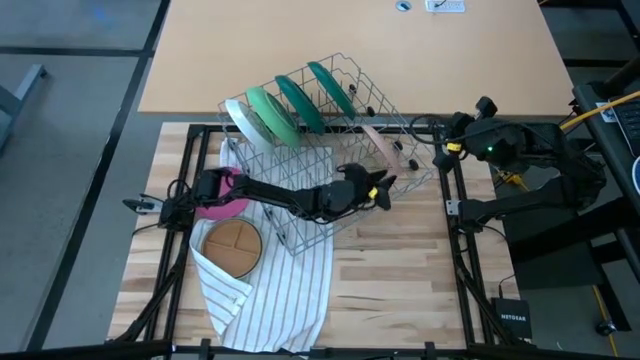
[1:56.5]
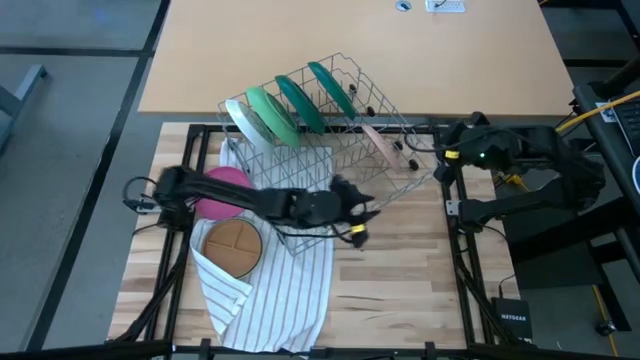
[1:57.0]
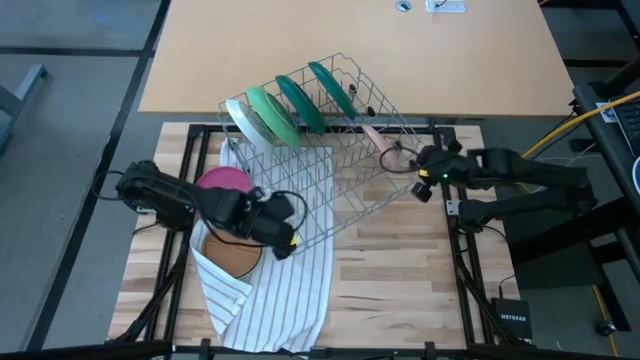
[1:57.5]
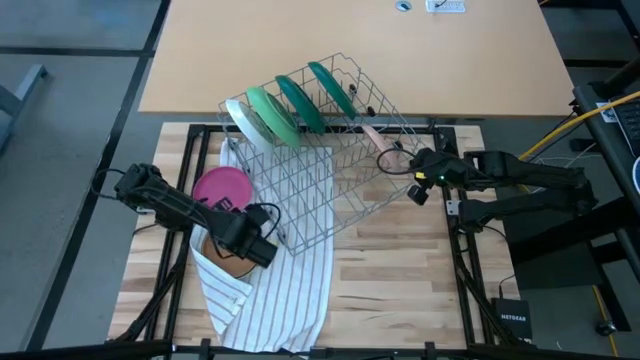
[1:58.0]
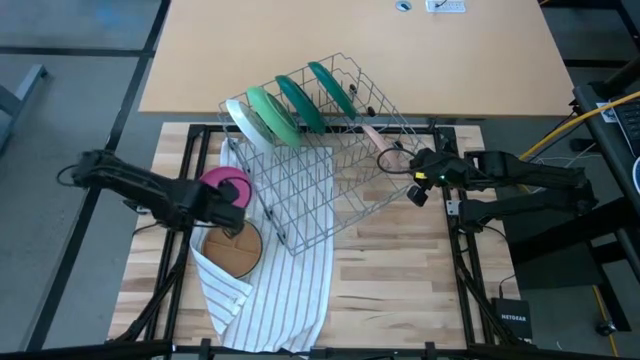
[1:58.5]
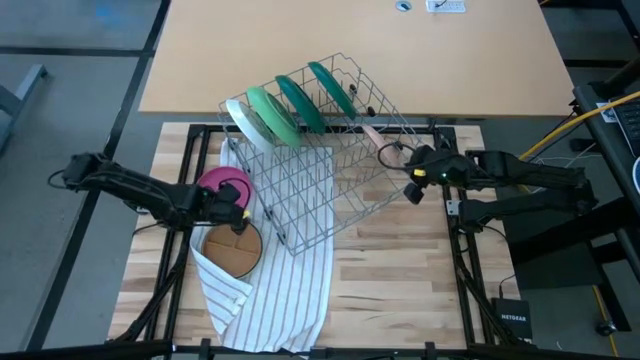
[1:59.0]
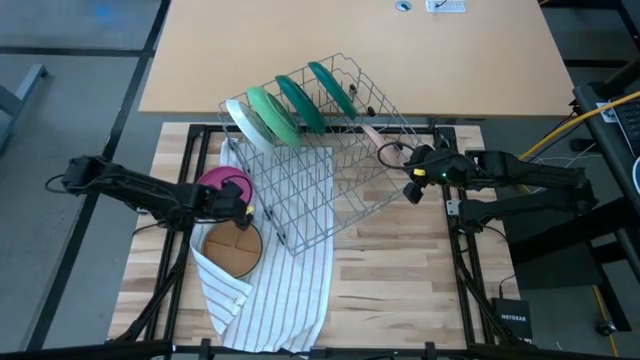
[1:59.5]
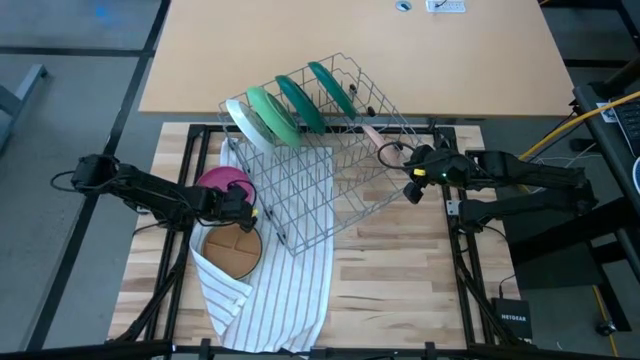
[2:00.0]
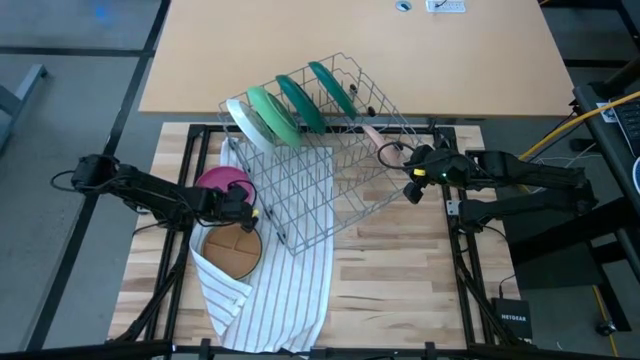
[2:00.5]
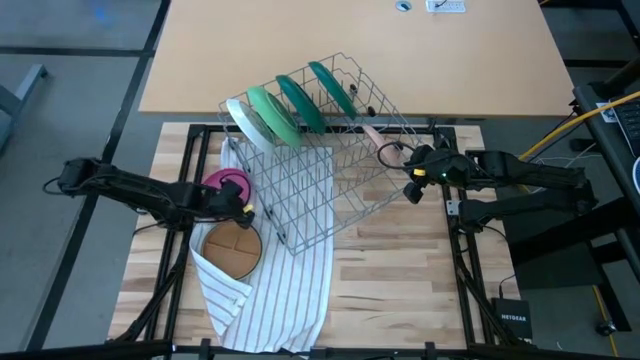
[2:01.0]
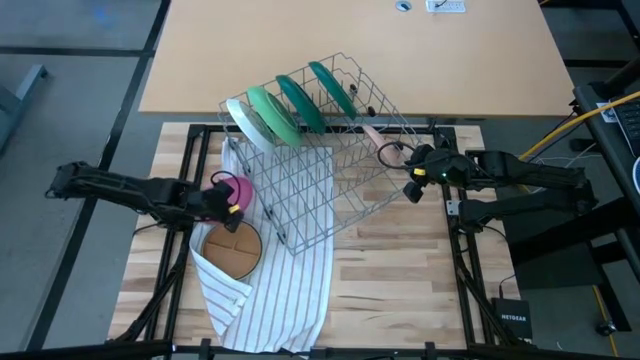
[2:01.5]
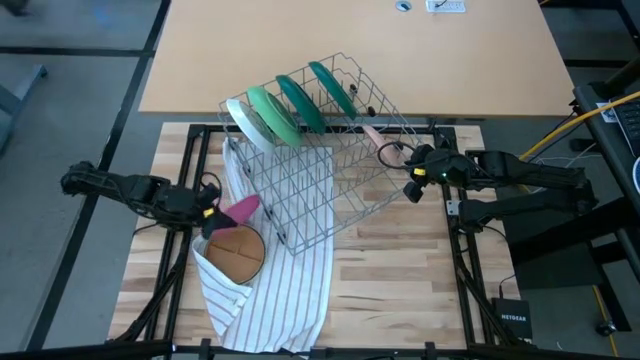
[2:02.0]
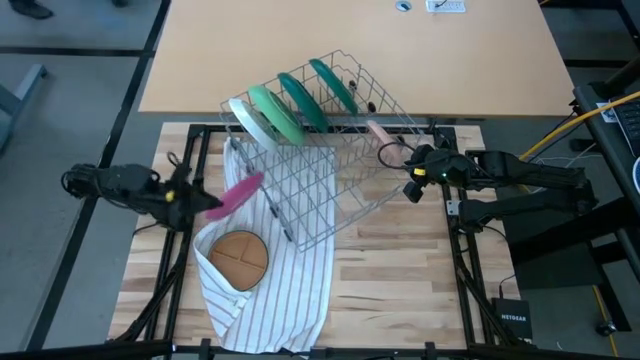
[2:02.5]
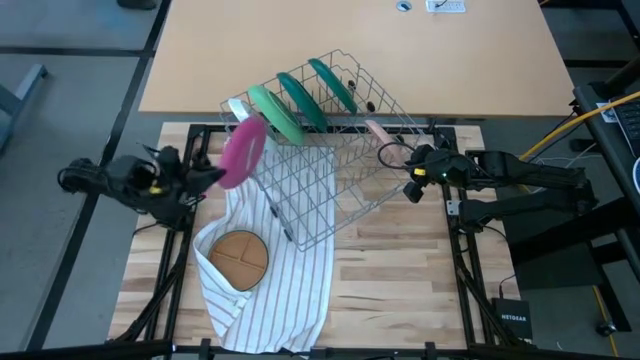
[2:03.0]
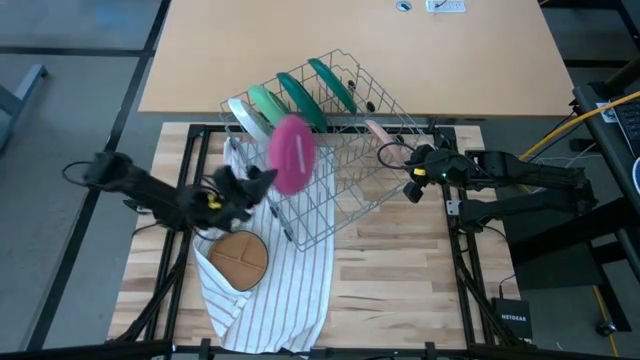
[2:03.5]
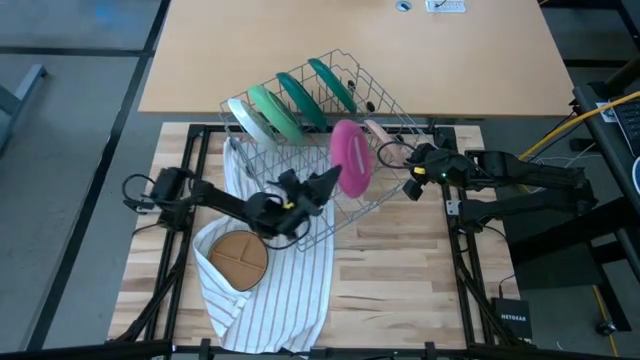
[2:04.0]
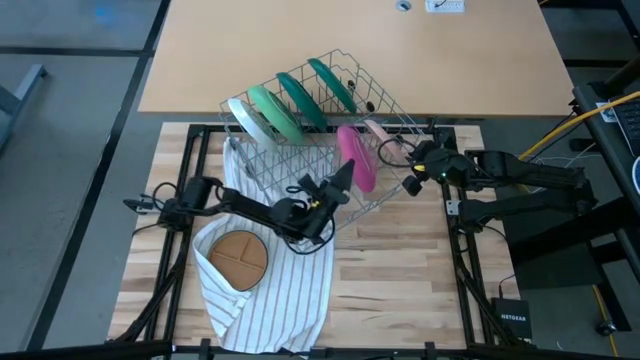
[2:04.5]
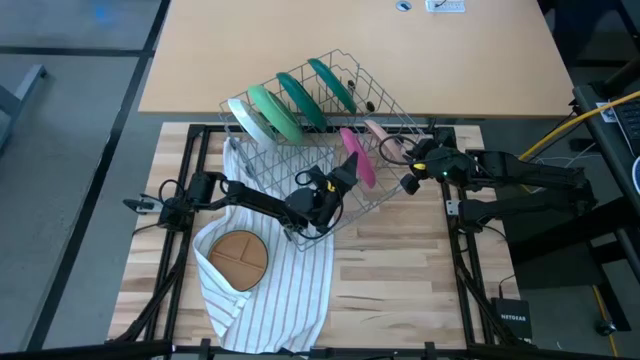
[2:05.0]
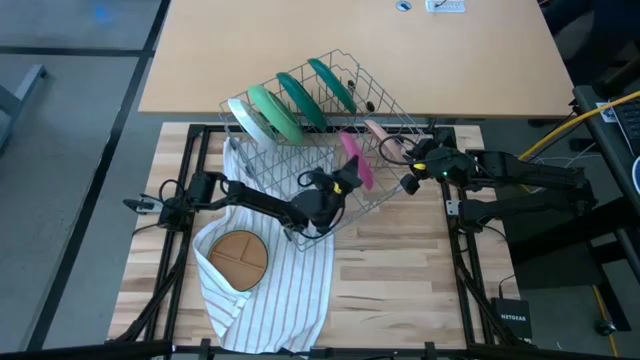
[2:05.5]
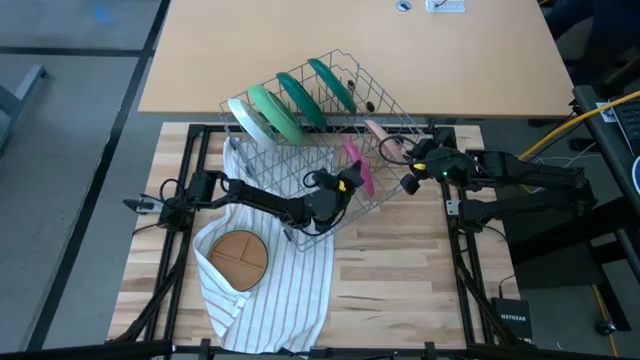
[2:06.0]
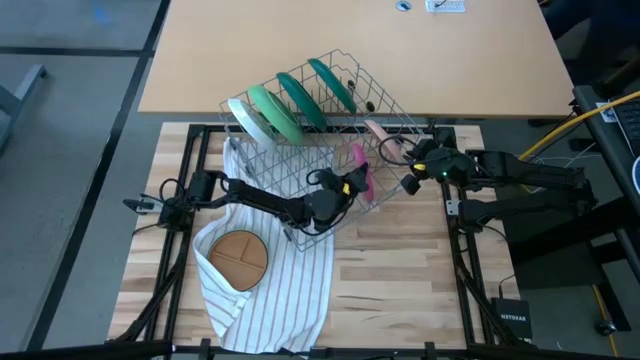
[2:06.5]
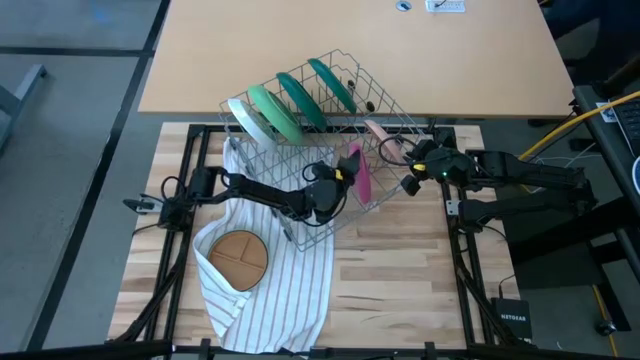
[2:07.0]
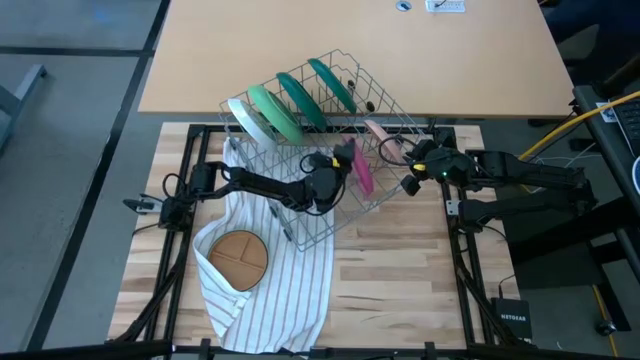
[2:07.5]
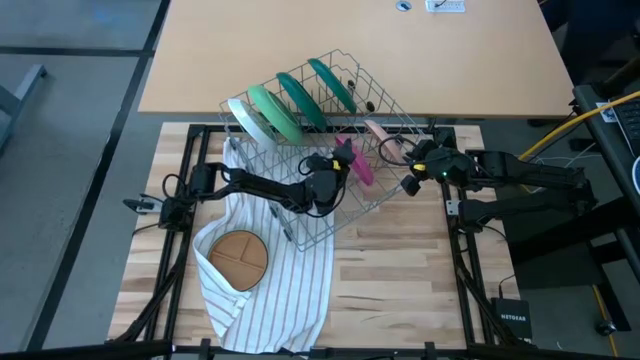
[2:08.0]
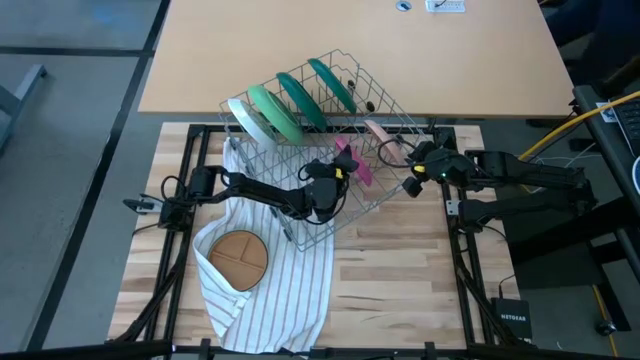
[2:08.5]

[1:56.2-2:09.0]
Task: Sort dishes
Put the pink plate in the dish rack

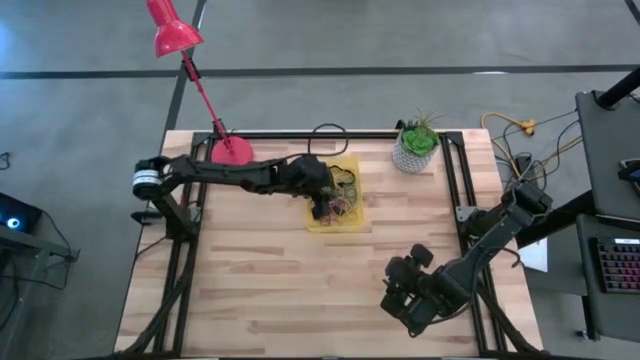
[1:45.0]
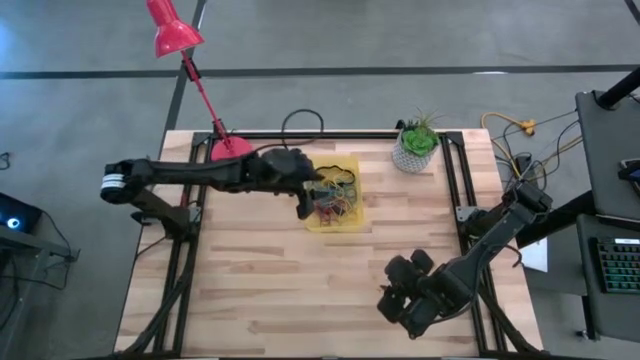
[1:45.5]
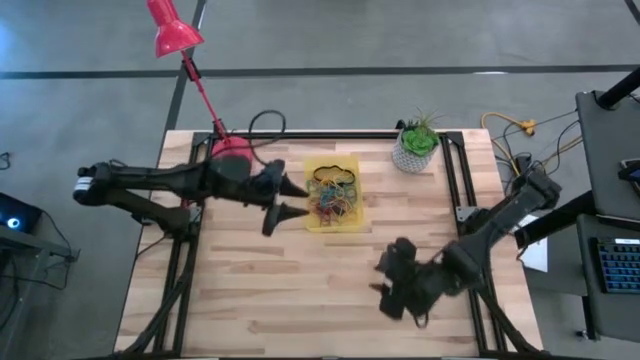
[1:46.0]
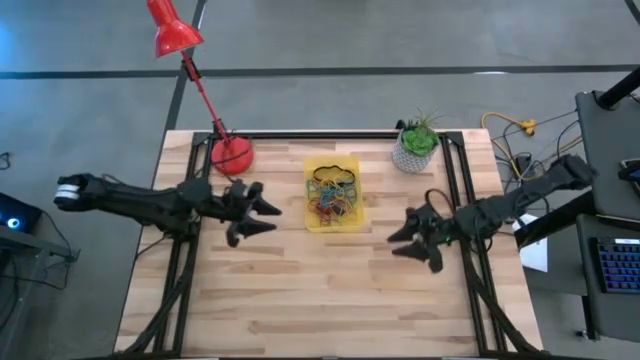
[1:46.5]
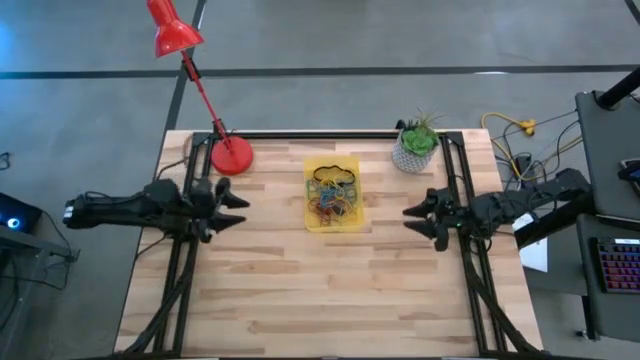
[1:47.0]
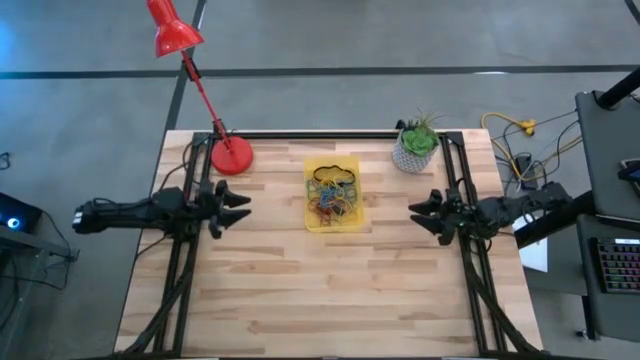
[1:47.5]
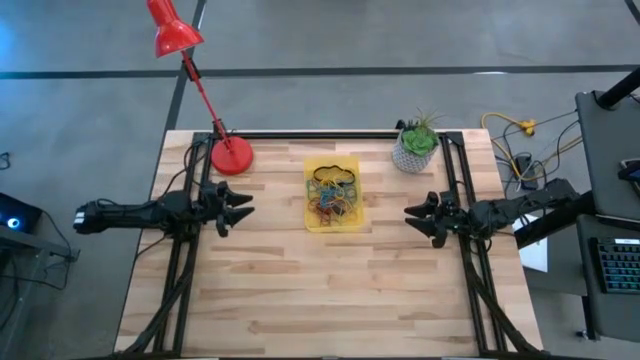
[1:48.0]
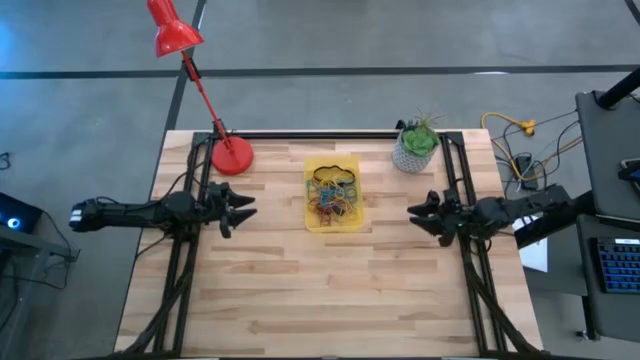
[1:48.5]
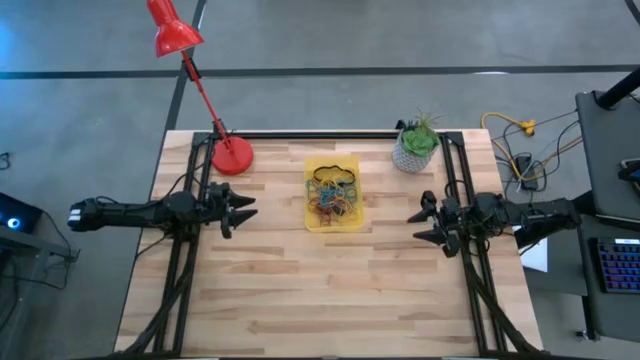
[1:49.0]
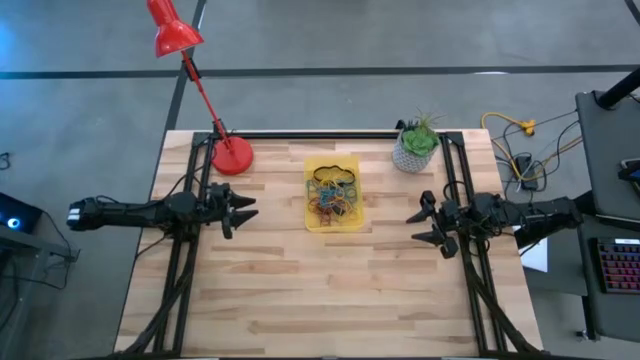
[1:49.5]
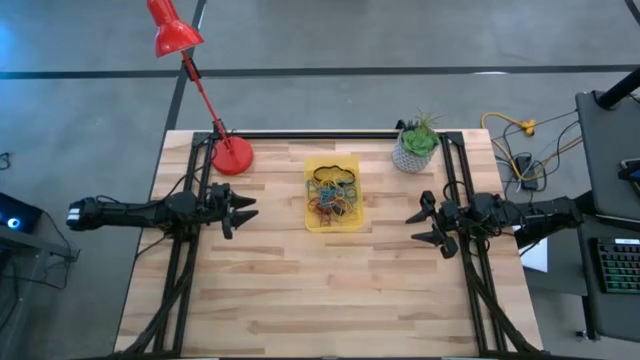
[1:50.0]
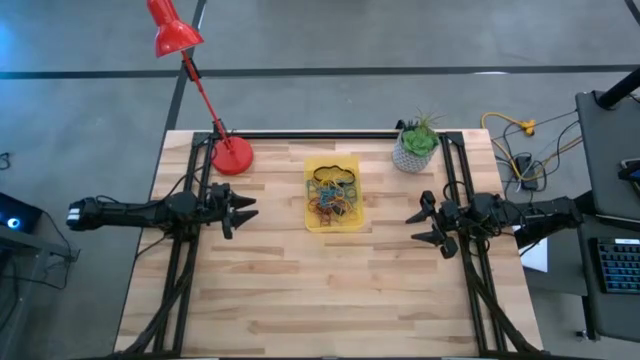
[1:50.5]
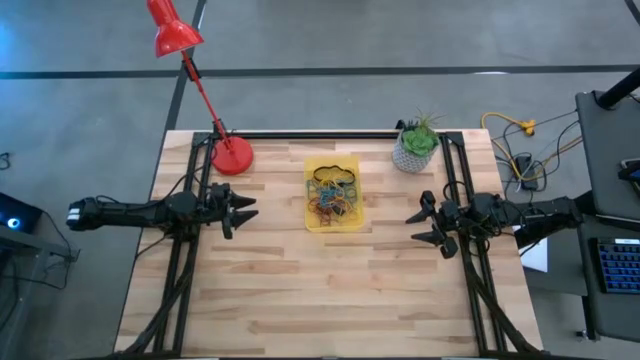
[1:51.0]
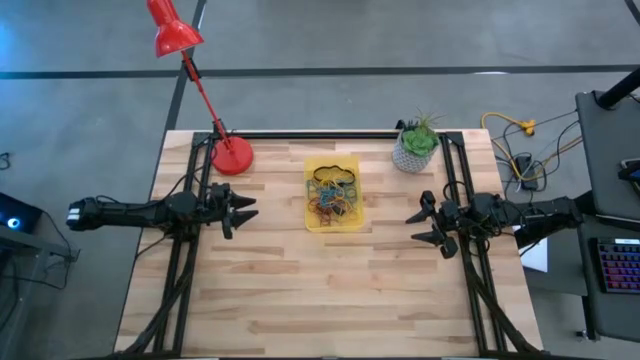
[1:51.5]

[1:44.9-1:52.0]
Task: Pick and place rubber bands into bin
Return to Home Position
